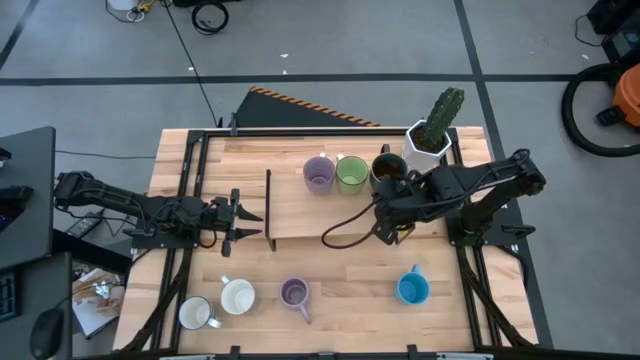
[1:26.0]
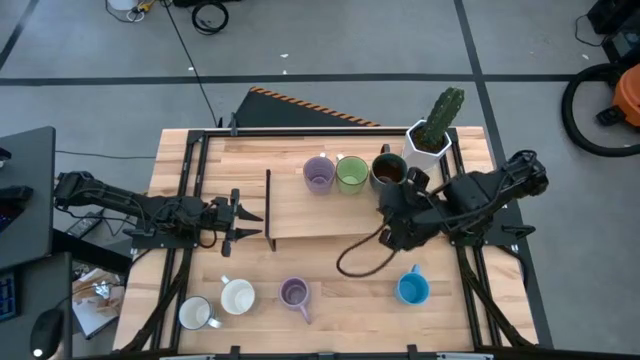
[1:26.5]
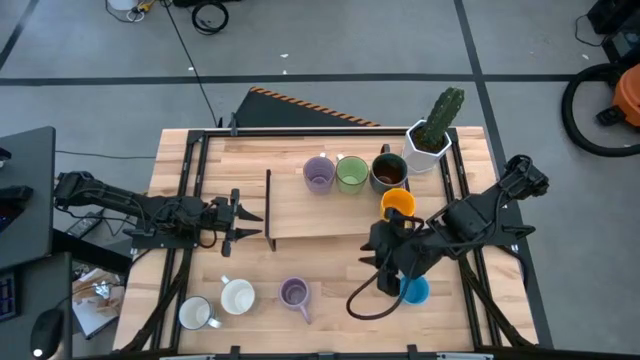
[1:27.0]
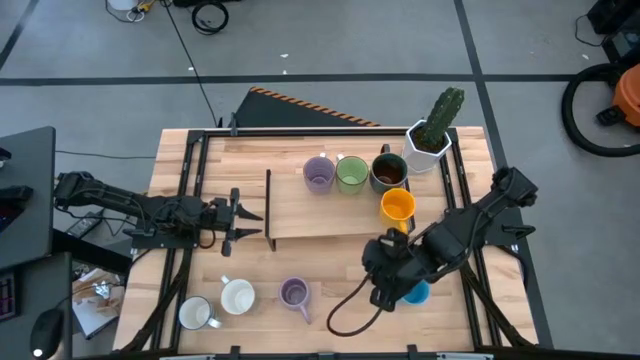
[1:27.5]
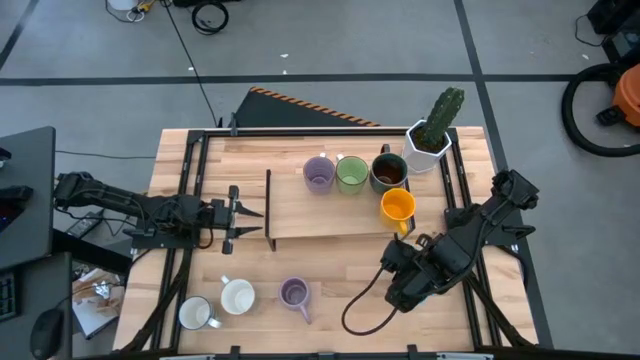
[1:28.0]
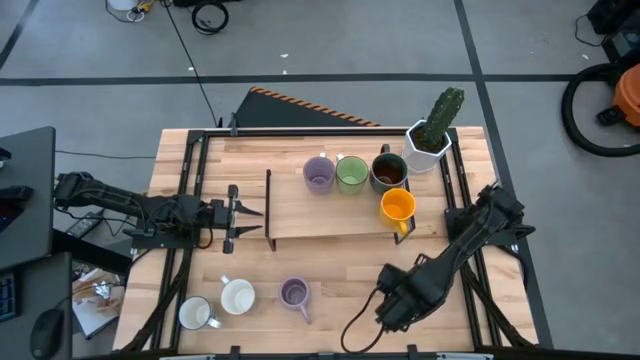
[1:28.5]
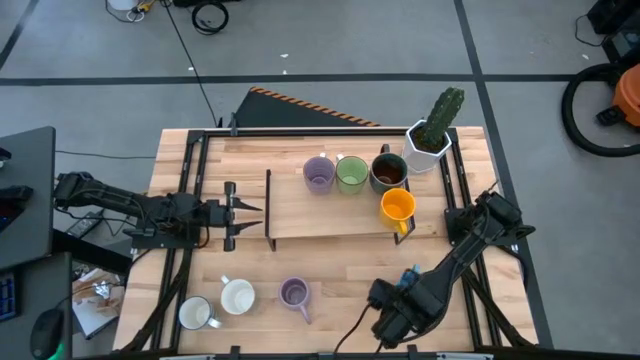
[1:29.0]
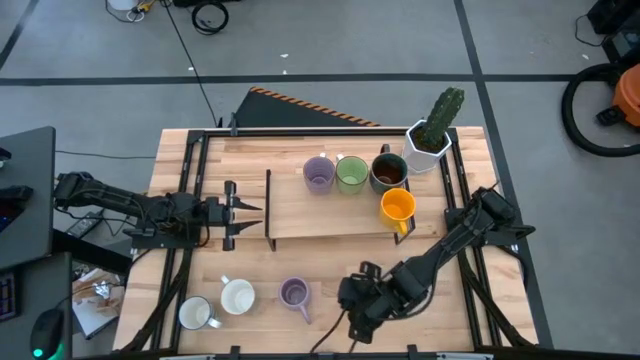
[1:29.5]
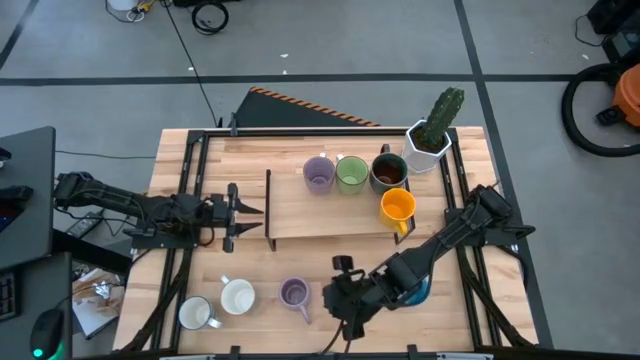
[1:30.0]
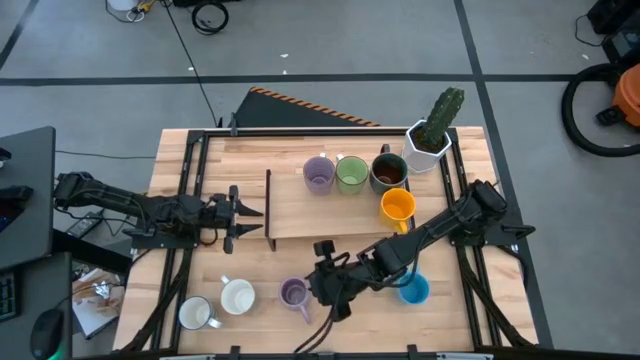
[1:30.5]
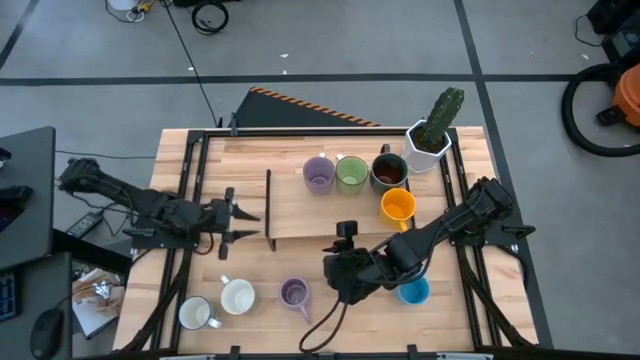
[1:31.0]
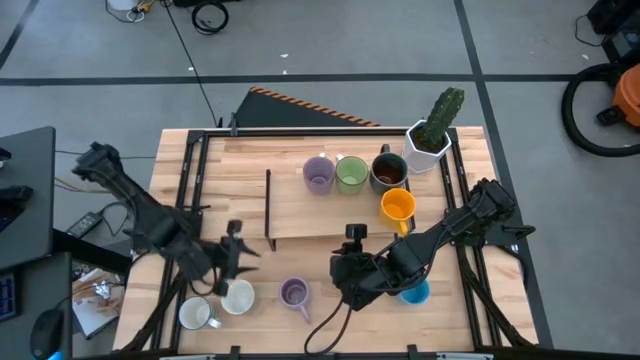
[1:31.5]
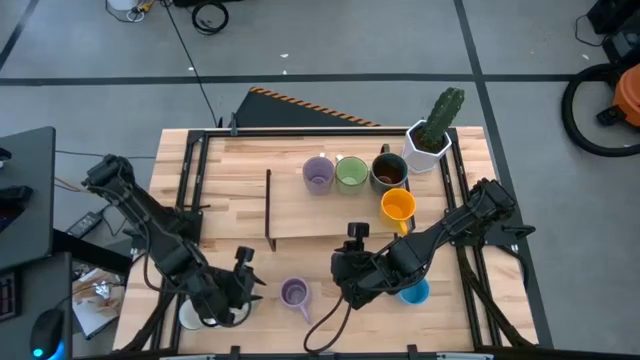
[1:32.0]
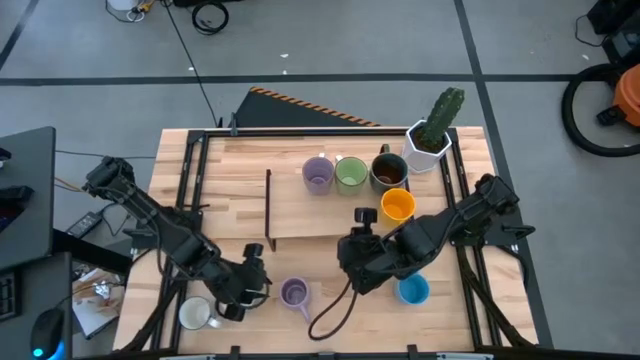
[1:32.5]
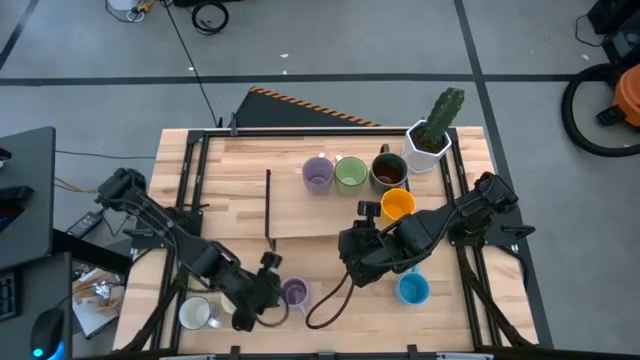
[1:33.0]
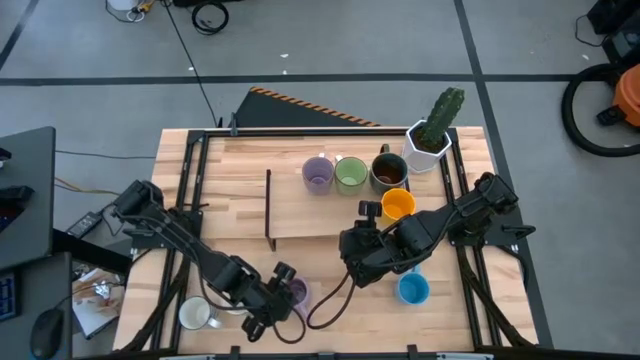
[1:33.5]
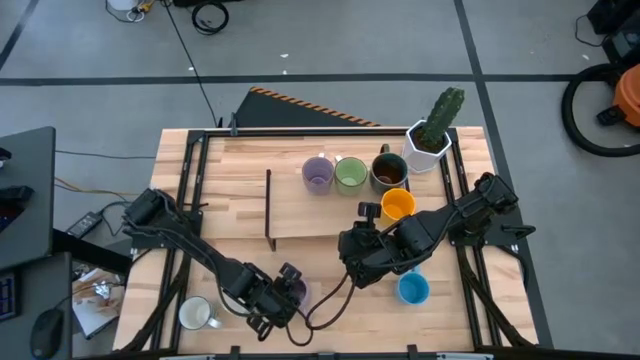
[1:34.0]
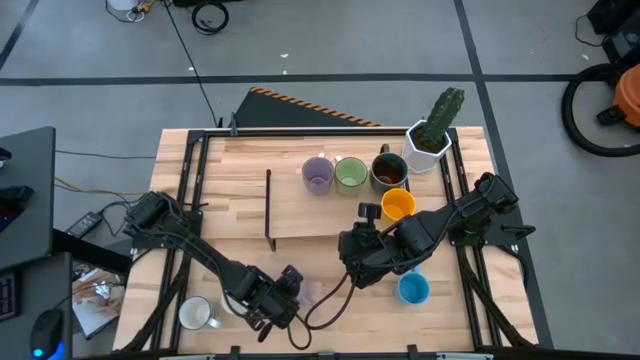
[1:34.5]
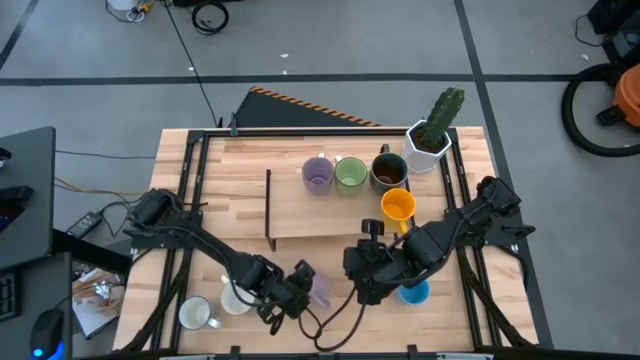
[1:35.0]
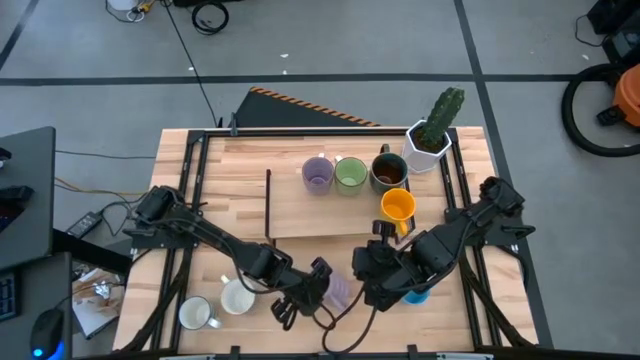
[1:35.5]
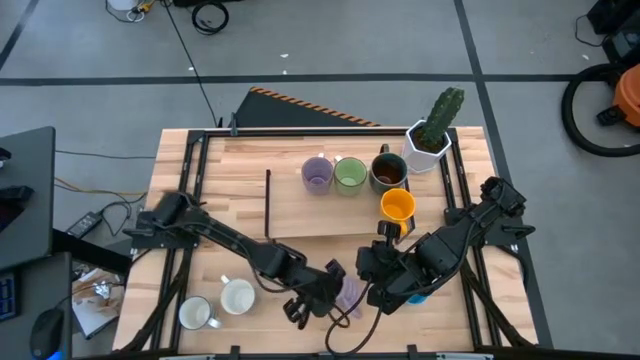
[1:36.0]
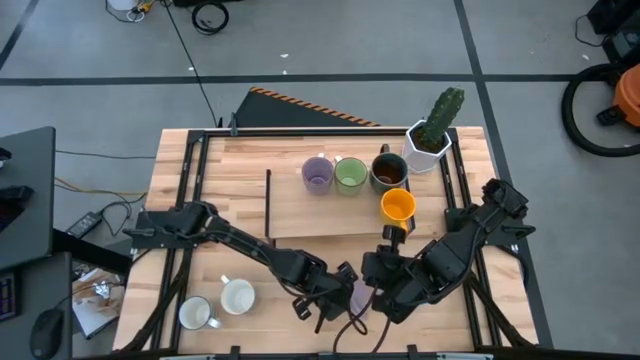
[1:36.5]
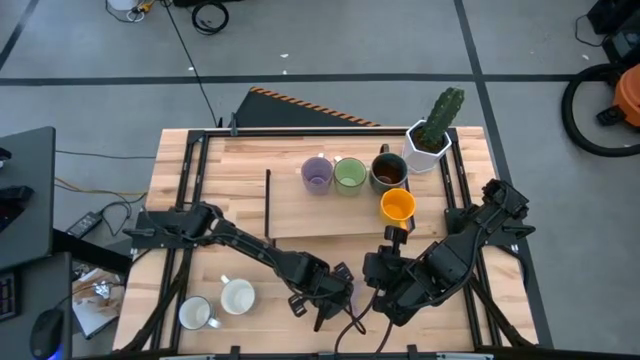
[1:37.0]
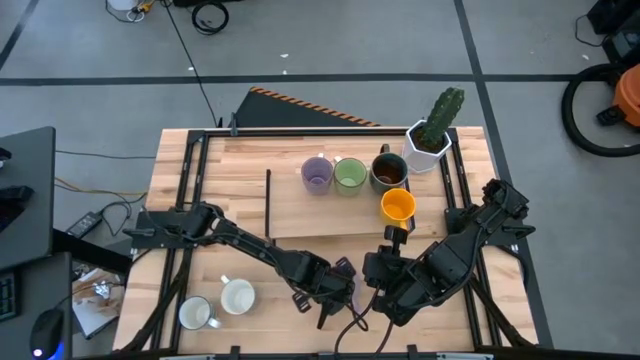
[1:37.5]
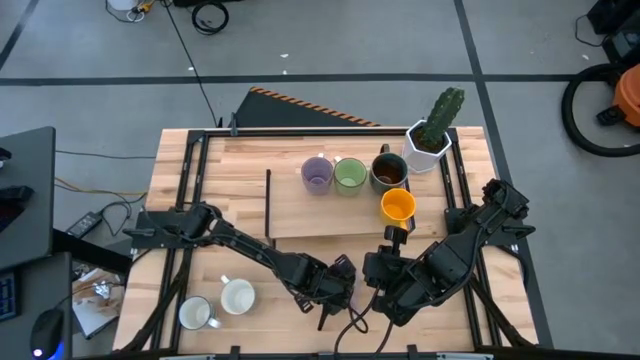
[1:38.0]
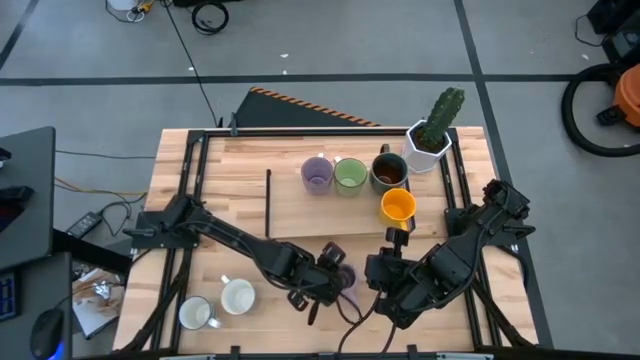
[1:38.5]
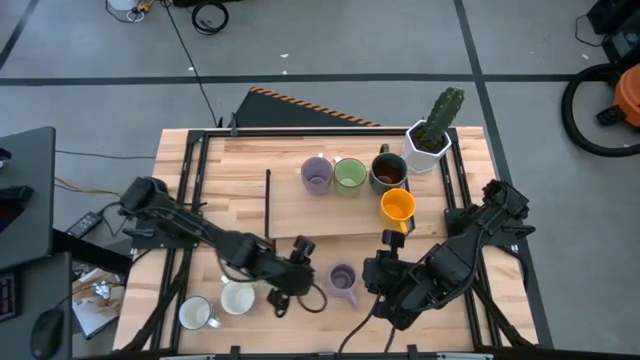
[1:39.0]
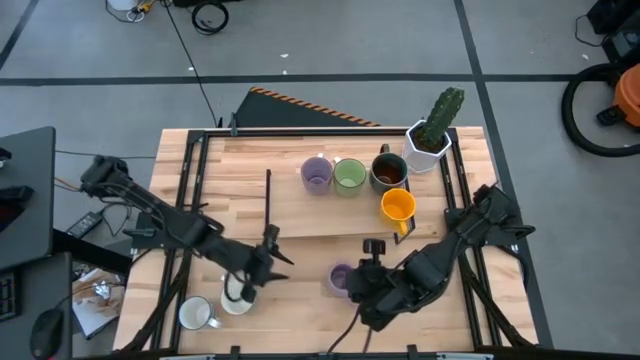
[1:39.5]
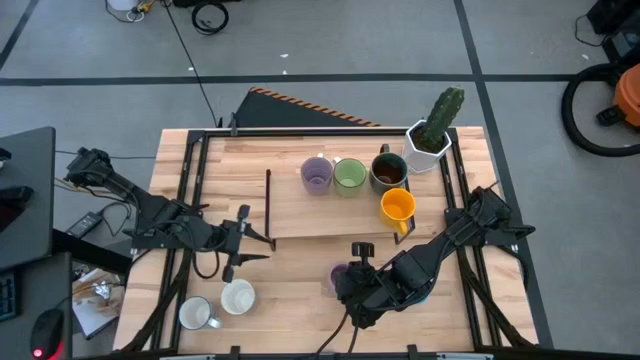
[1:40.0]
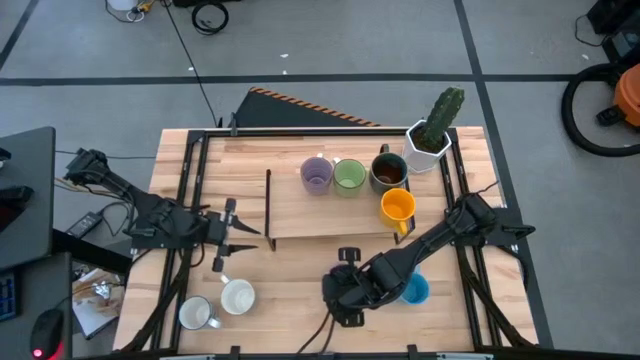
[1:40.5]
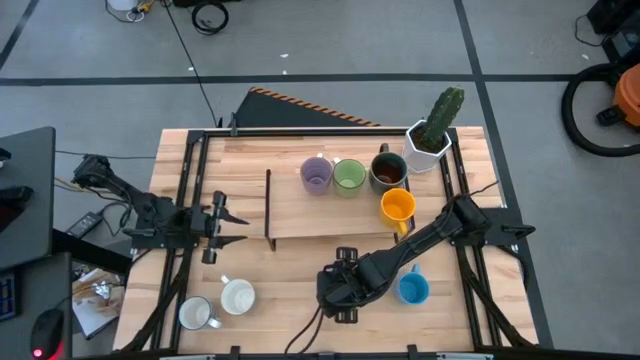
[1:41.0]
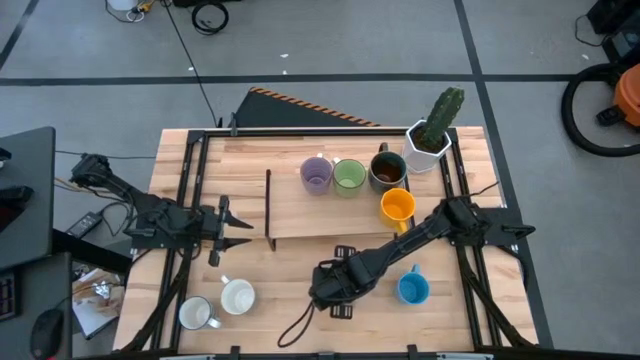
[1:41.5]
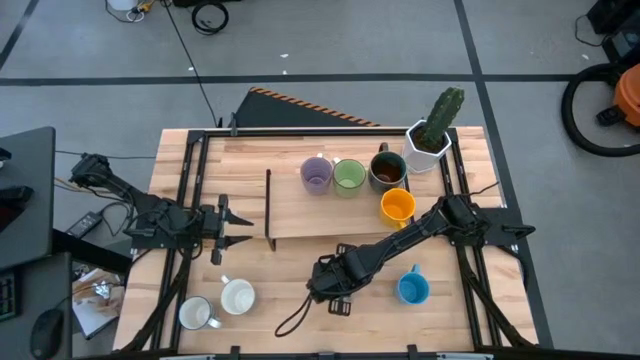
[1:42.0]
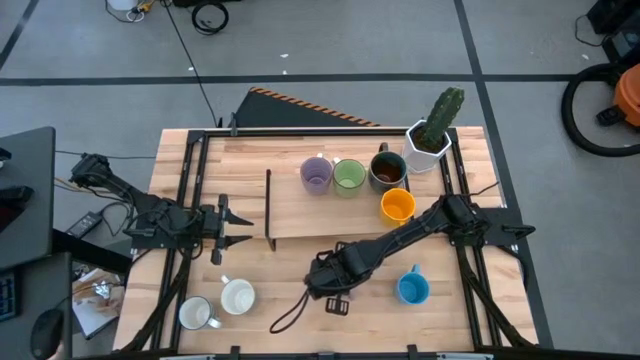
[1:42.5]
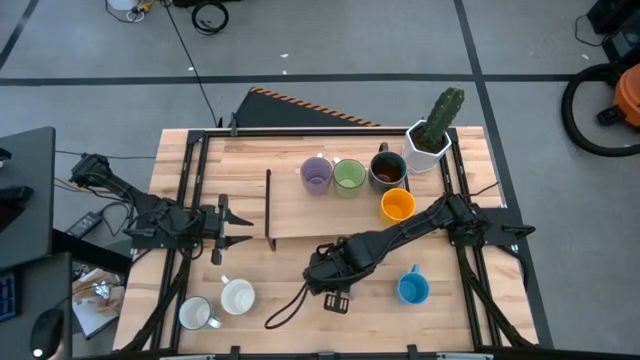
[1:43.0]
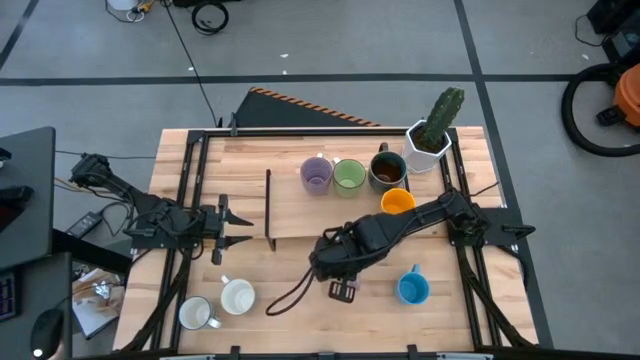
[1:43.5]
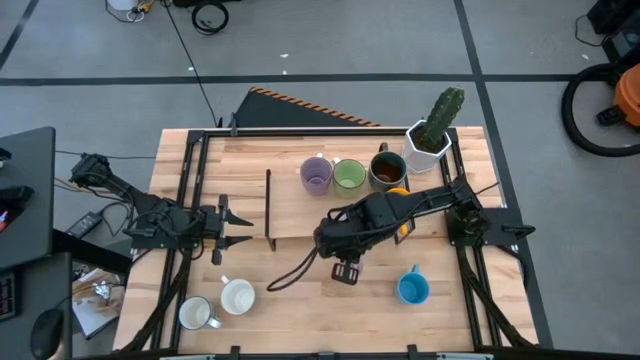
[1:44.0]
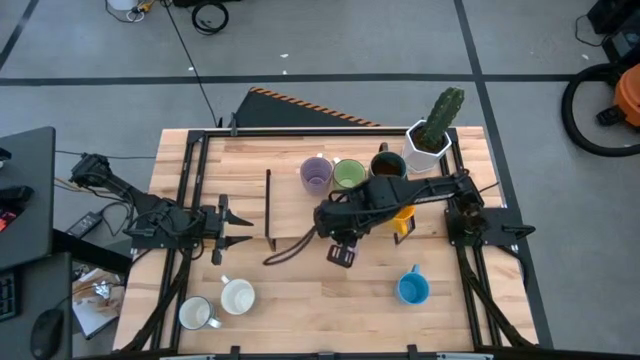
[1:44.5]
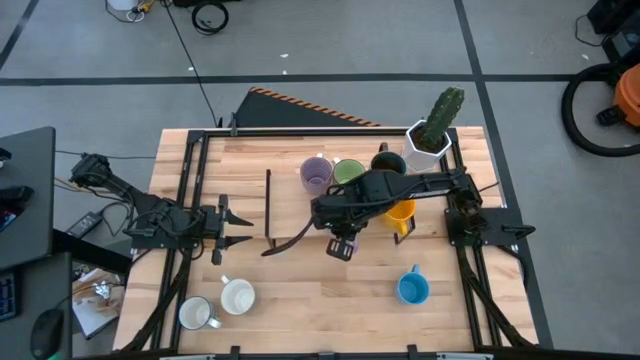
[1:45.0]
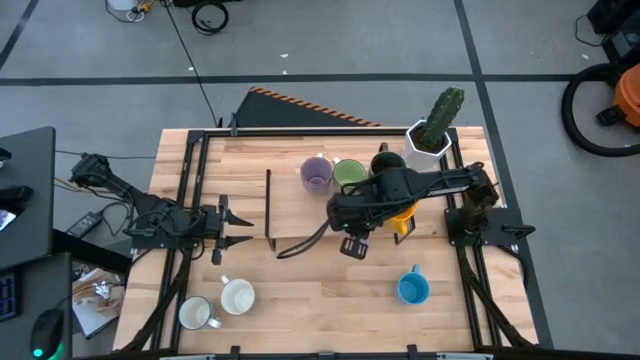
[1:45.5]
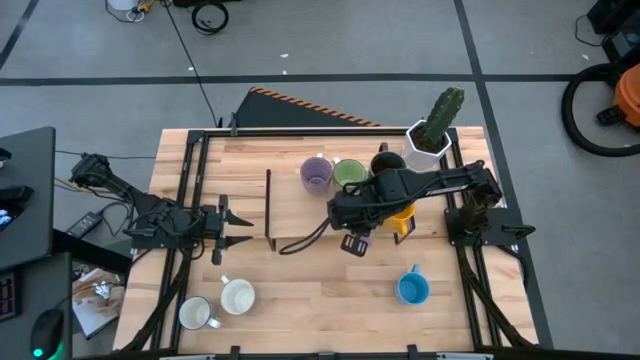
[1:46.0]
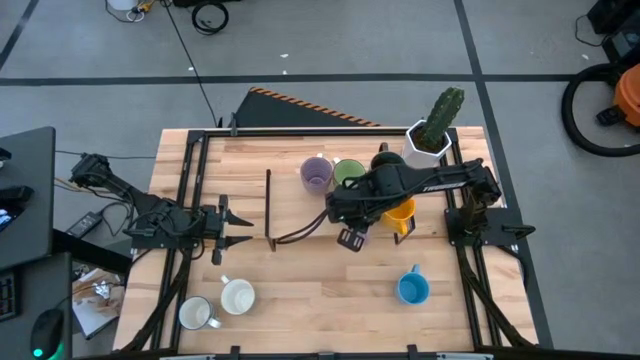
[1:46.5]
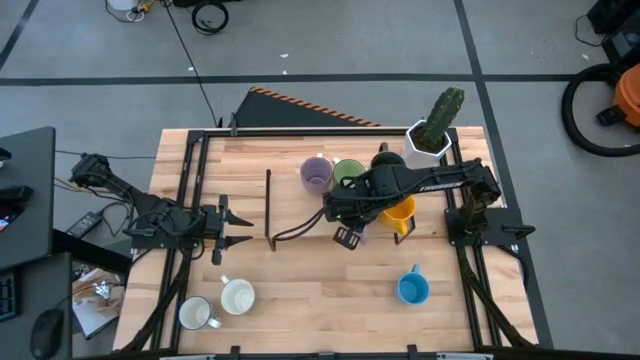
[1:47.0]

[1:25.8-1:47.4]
Task: Place coffee mugs
Put the purple mug on the shelf
